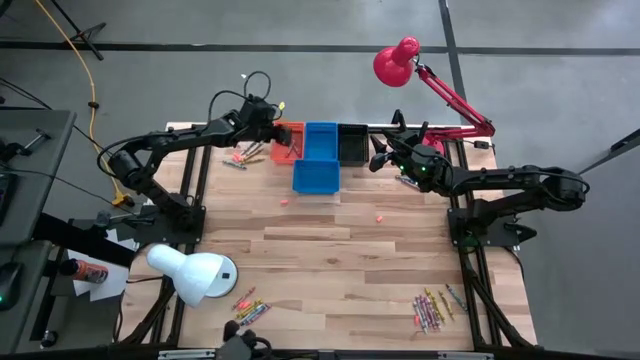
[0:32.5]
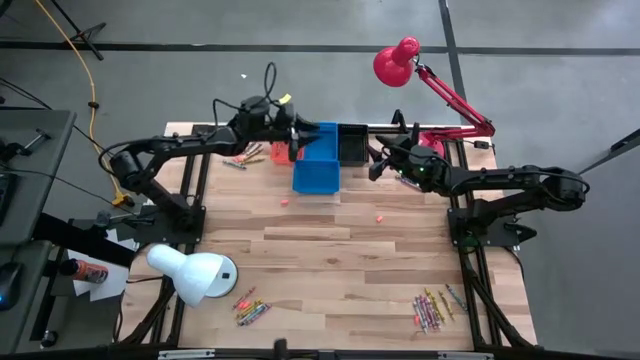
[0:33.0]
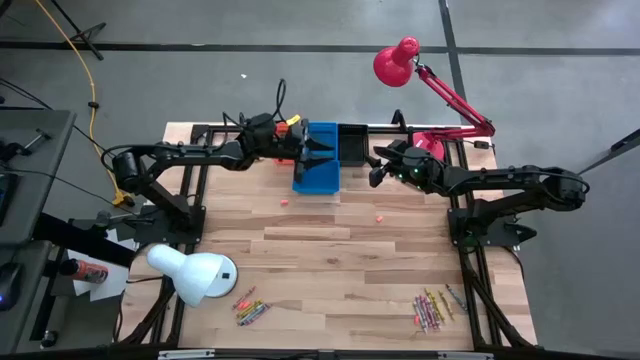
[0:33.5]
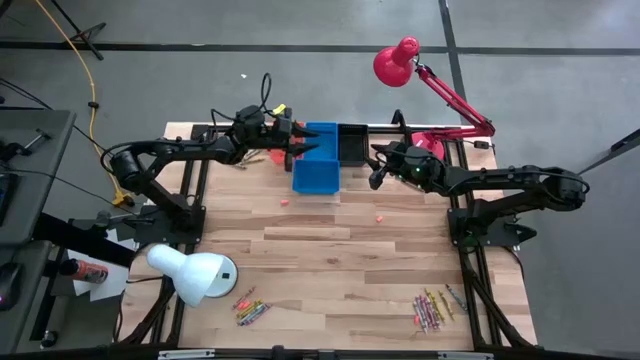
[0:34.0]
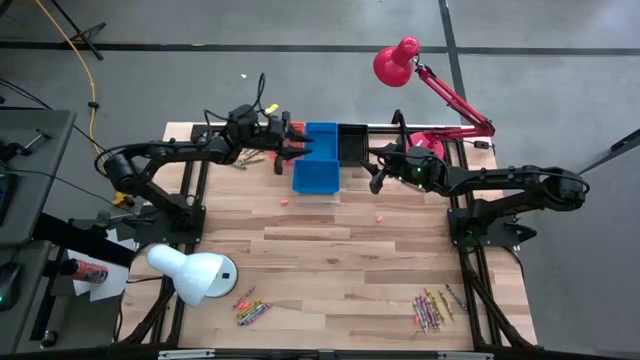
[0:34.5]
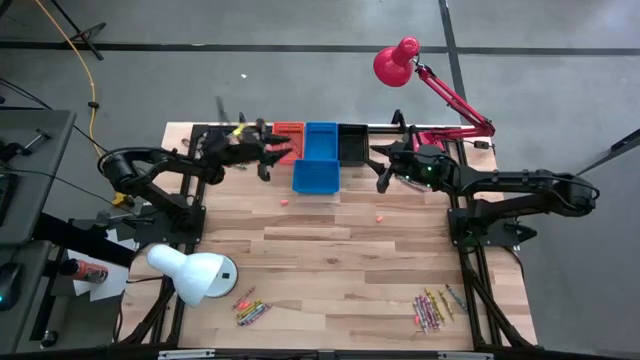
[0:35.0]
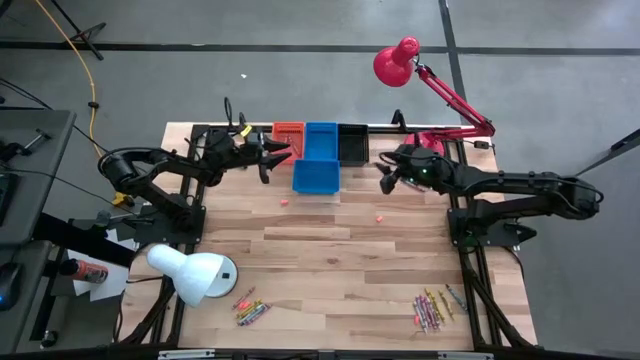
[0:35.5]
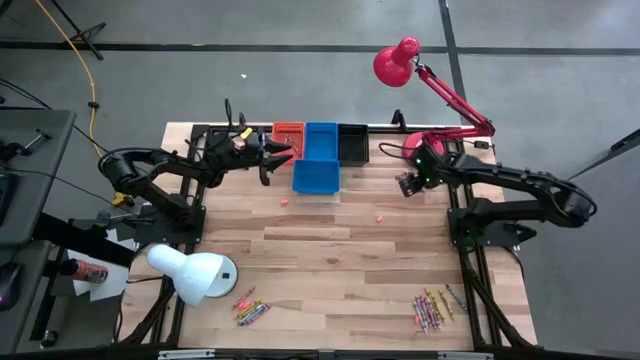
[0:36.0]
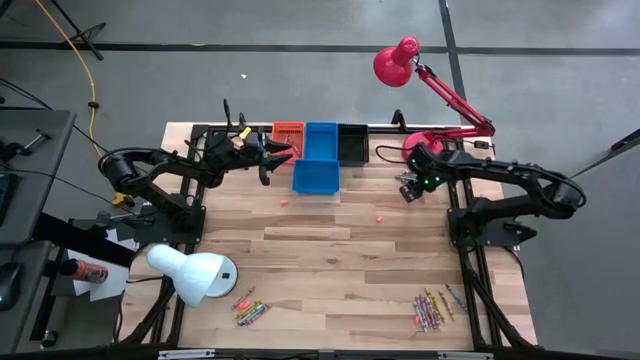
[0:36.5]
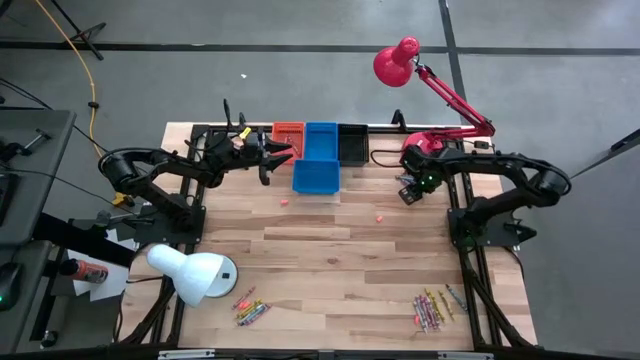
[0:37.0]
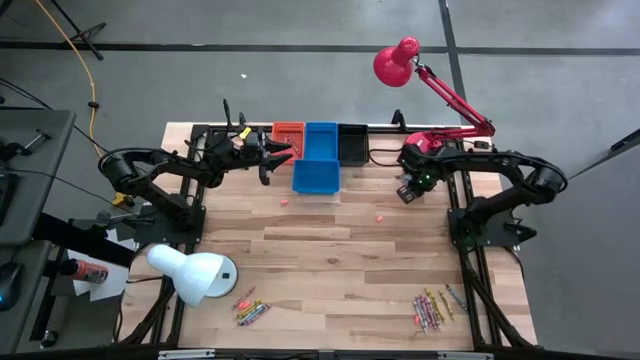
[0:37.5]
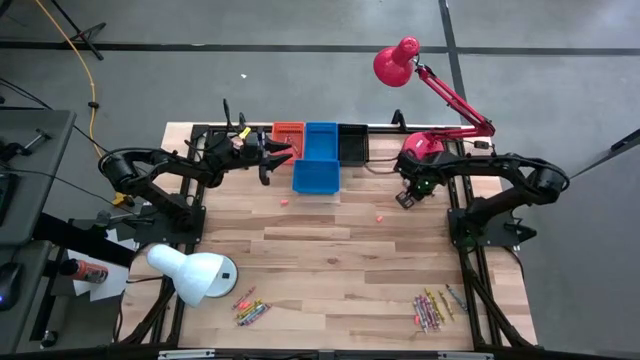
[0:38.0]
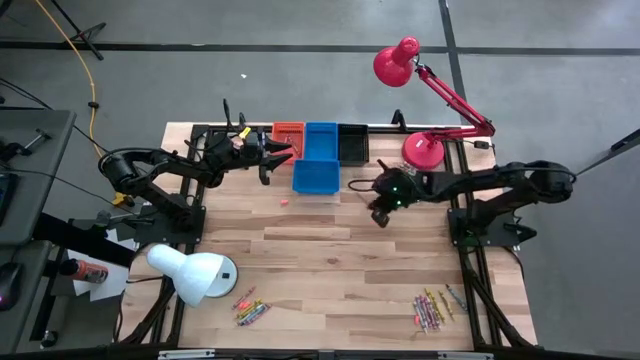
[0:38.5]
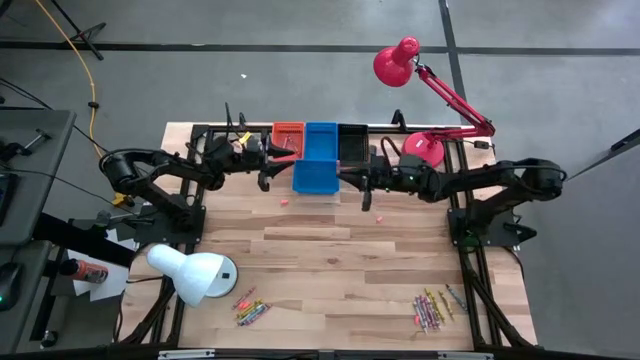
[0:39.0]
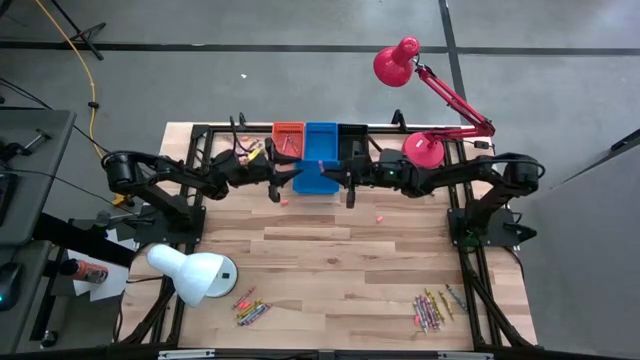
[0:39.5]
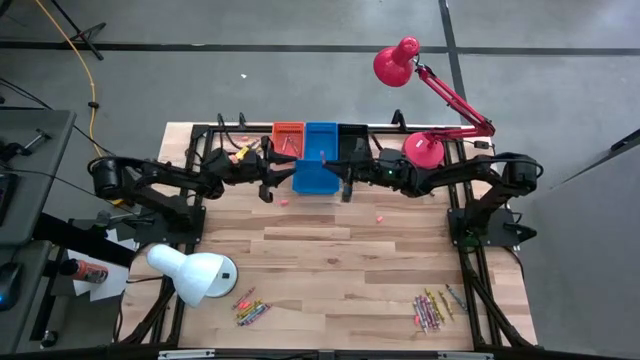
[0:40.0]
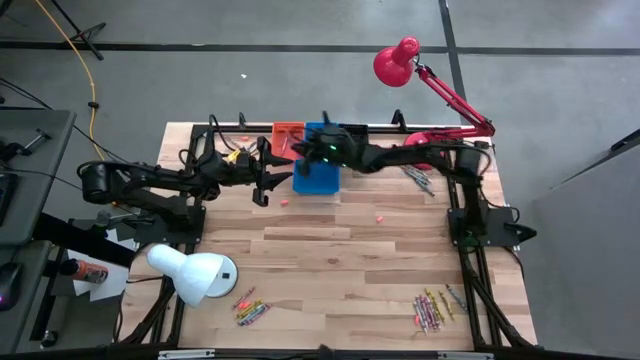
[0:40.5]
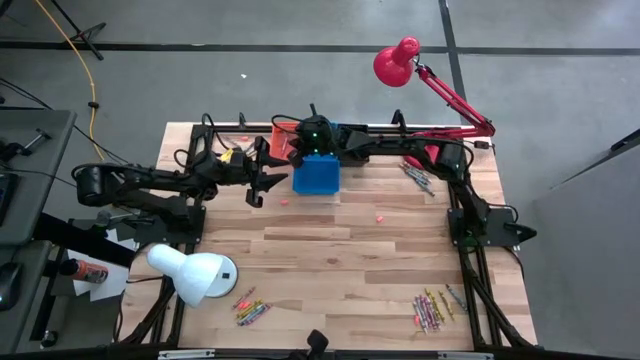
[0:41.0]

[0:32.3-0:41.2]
Task: Sort crayons
Put the pink crayon into the orange bin

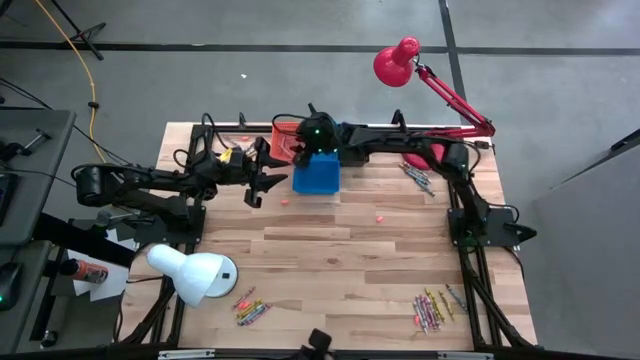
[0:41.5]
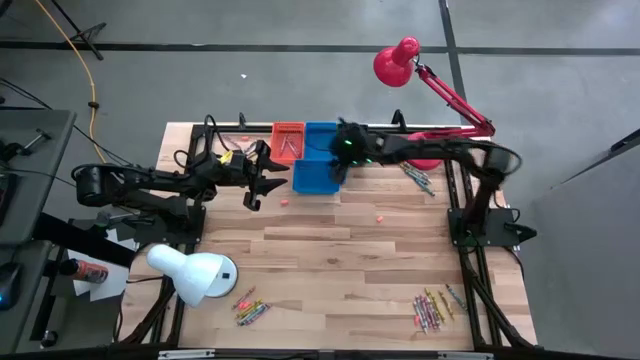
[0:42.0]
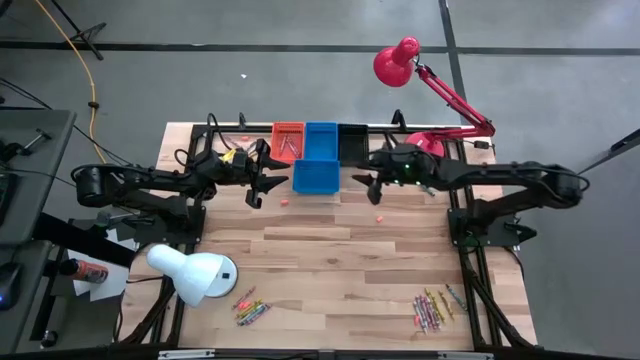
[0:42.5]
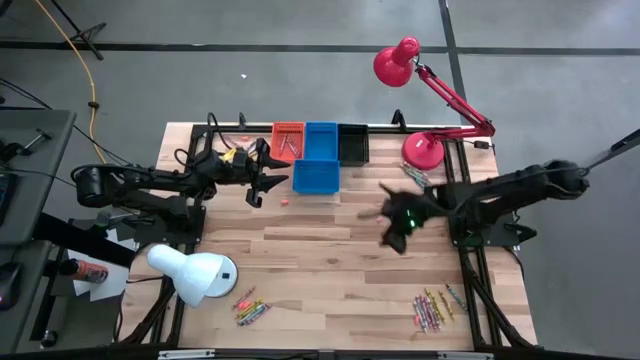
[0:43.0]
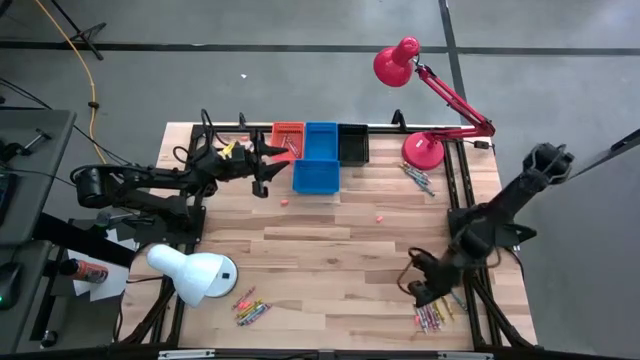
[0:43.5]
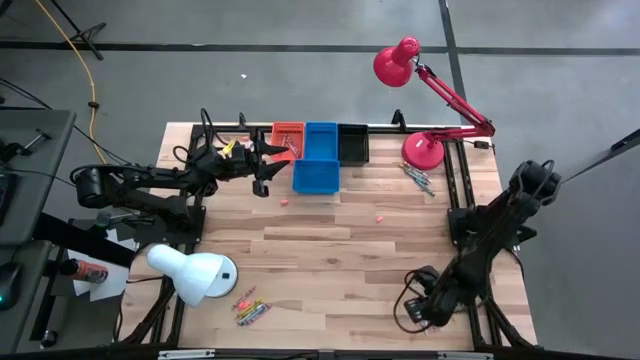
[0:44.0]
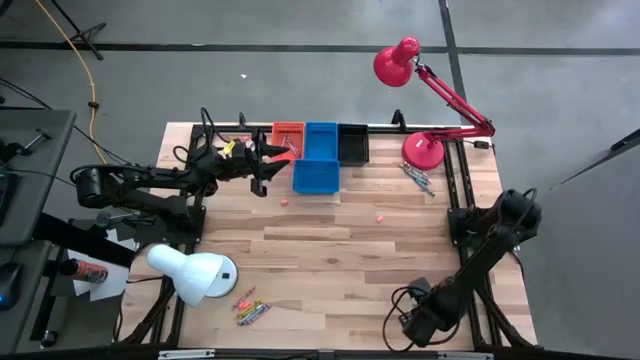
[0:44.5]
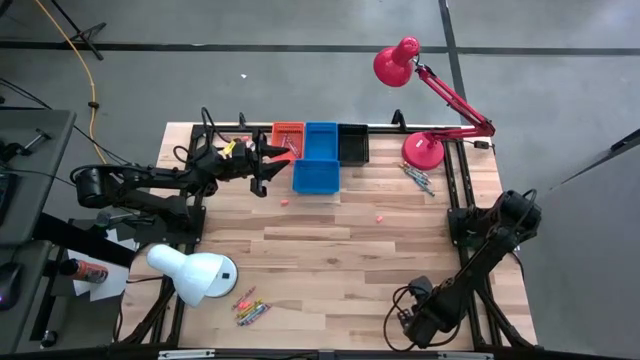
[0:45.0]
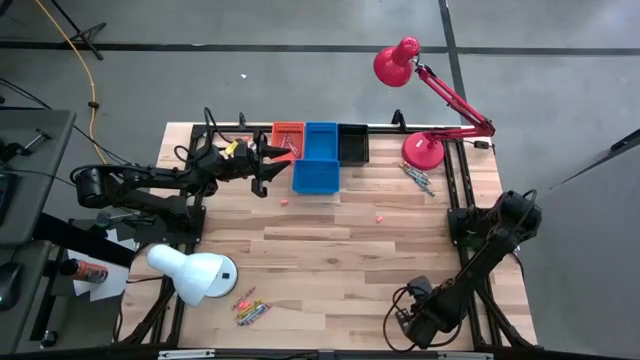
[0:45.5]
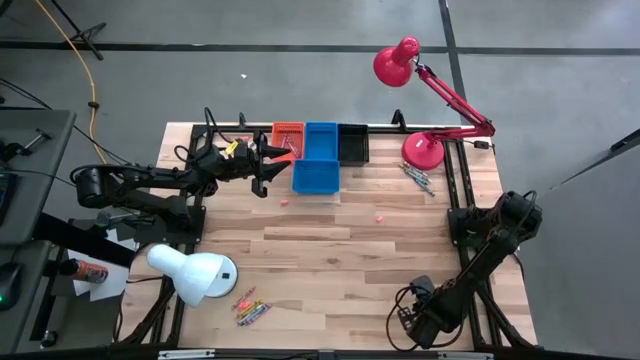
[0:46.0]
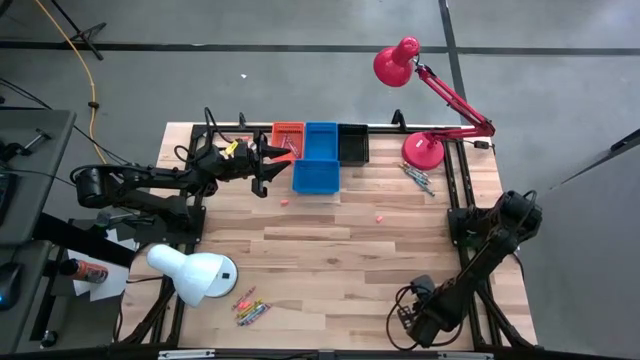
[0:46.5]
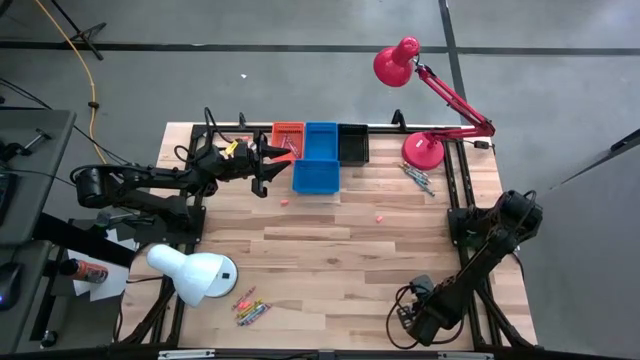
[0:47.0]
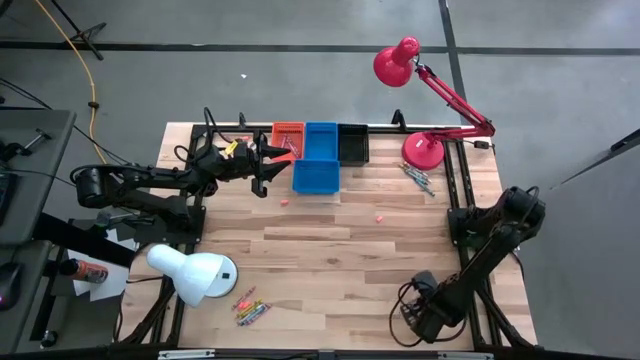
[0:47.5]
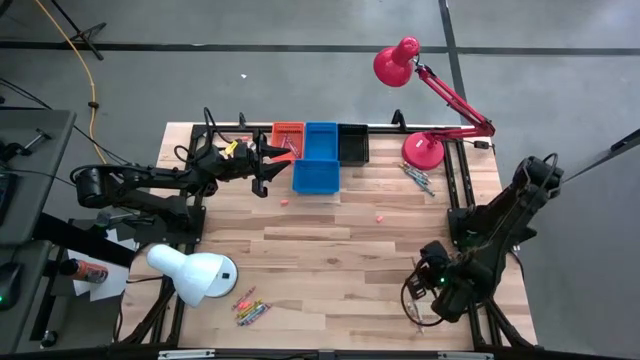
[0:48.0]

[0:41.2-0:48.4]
Put the pink crayon into the orange bin

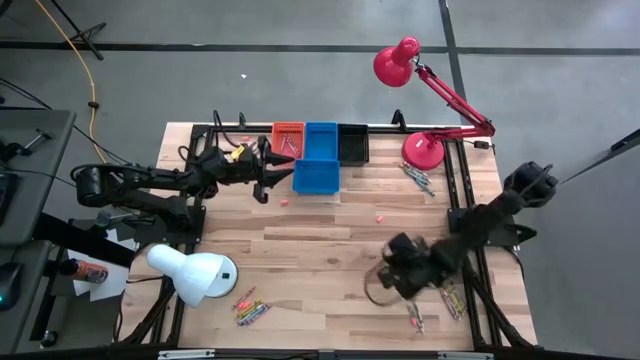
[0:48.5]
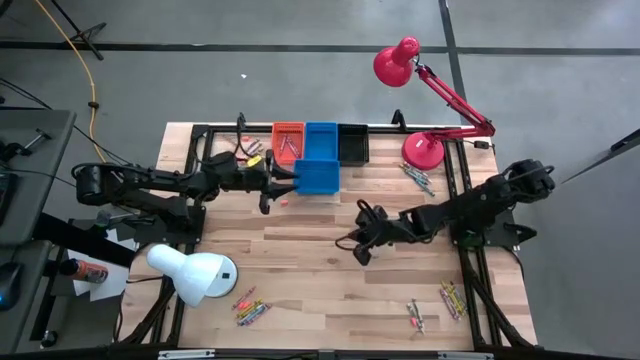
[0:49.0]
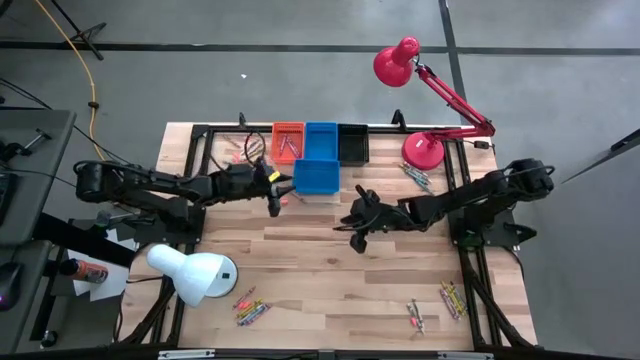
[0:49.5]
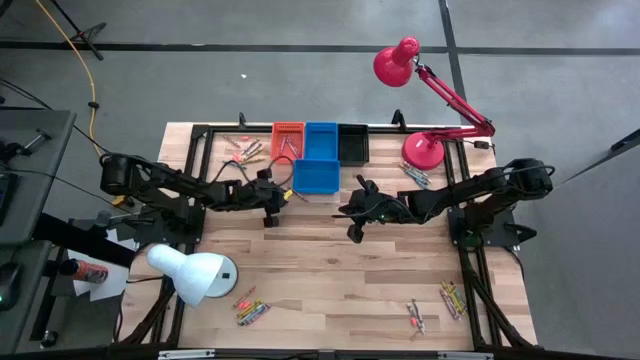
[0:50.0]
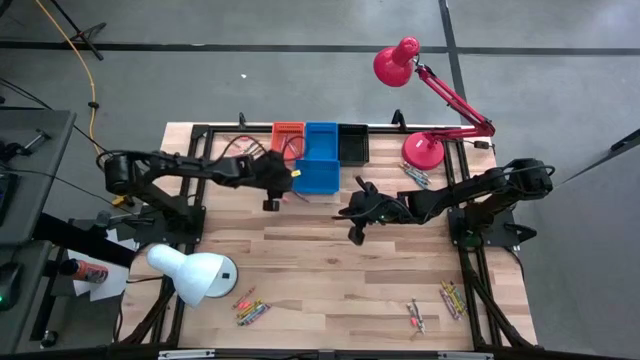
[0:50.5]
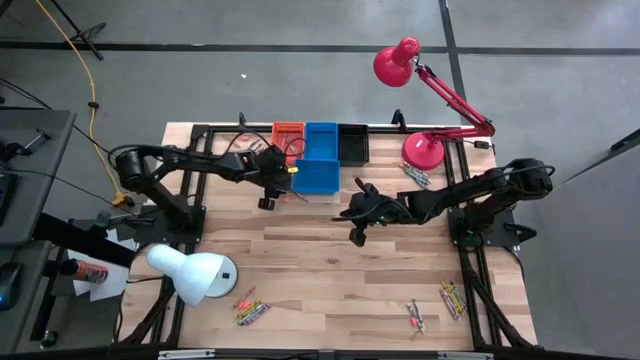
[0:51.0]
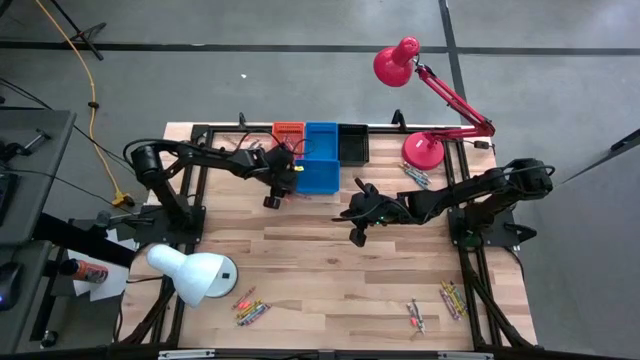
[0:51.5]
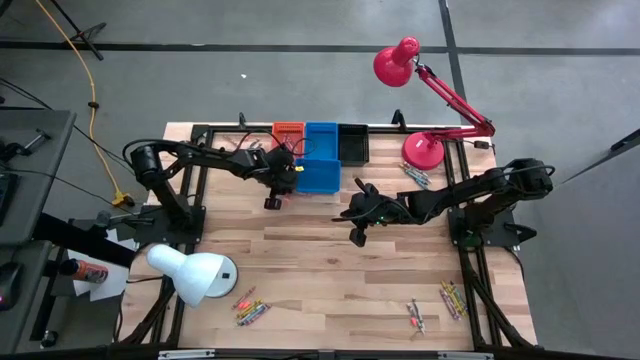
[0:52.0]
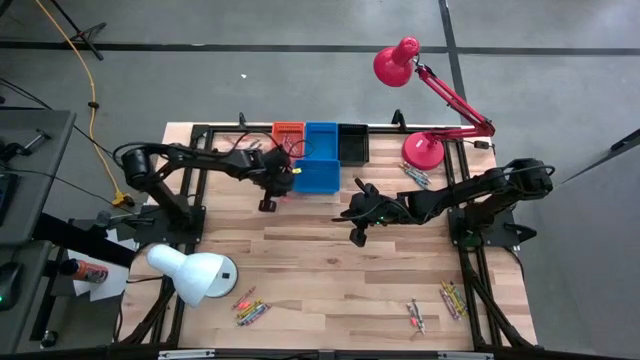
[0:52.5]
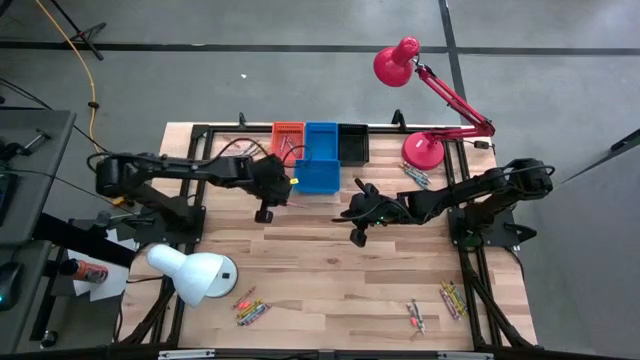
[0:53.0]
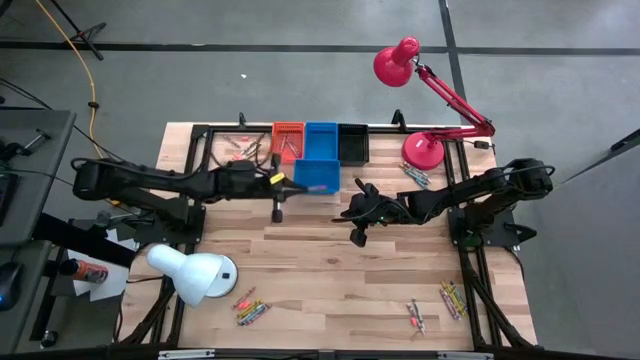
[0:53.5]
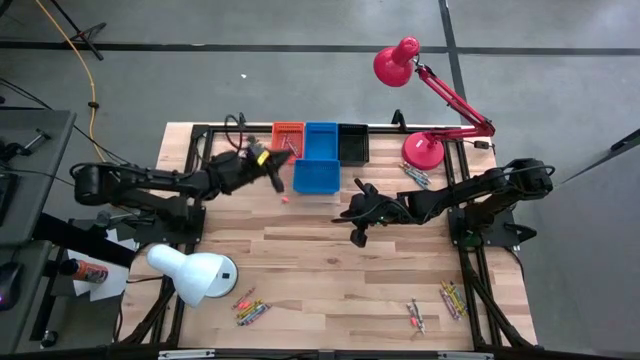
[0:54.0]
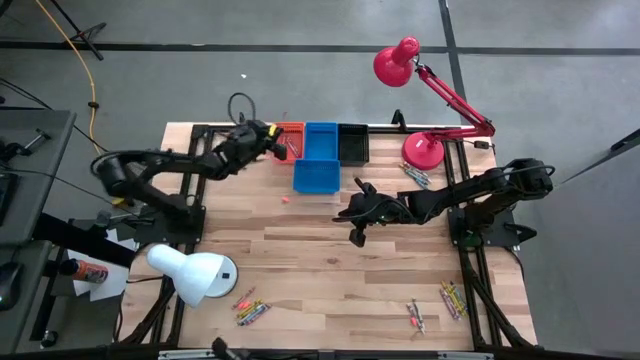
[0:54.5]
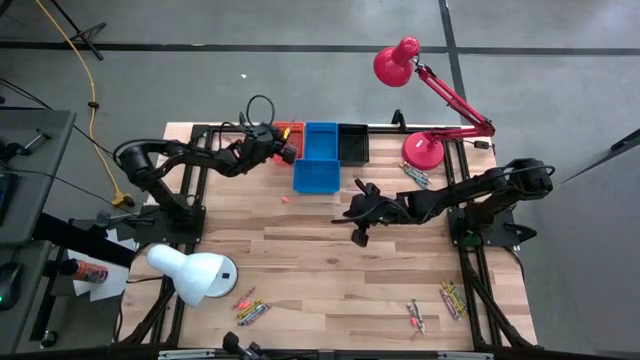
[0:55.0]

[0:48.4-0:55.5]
Put the pink crayon into the orange bin
